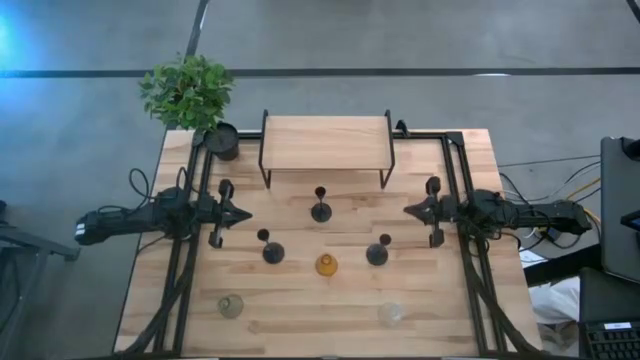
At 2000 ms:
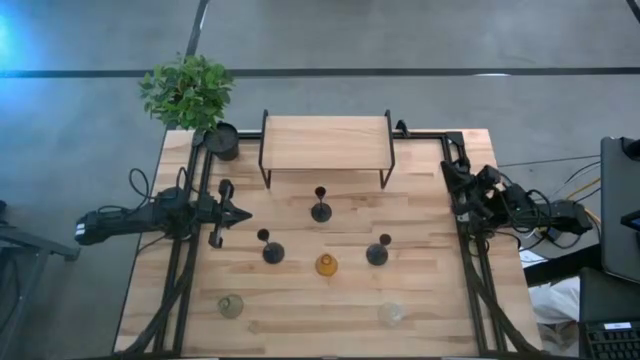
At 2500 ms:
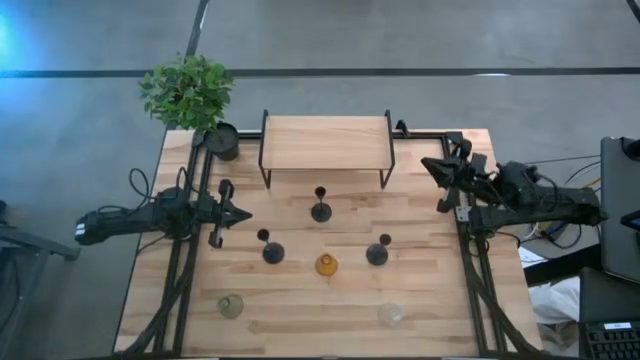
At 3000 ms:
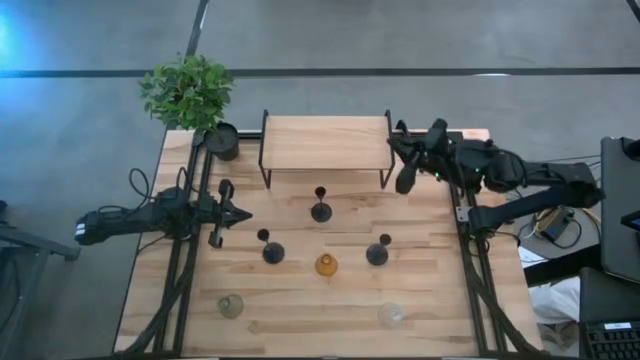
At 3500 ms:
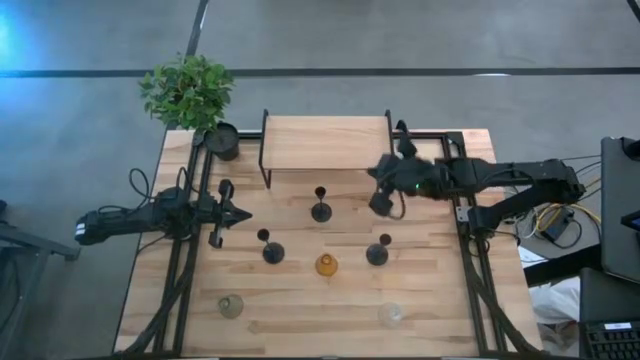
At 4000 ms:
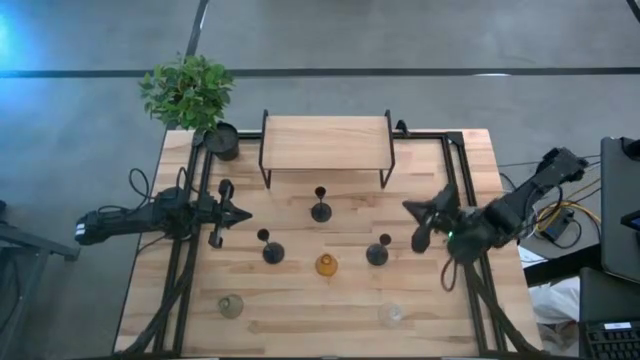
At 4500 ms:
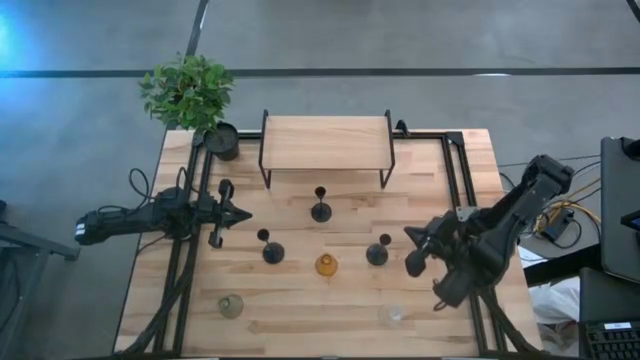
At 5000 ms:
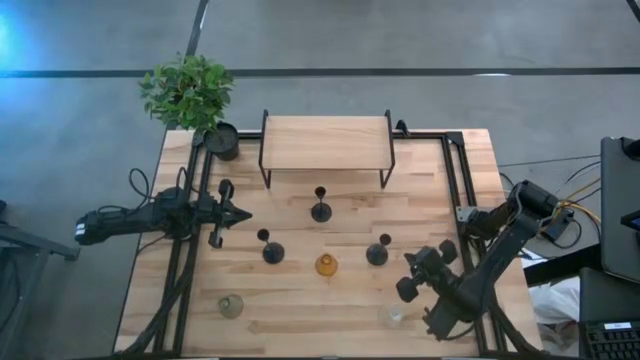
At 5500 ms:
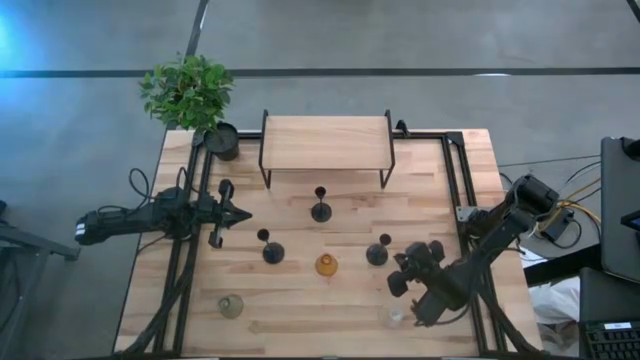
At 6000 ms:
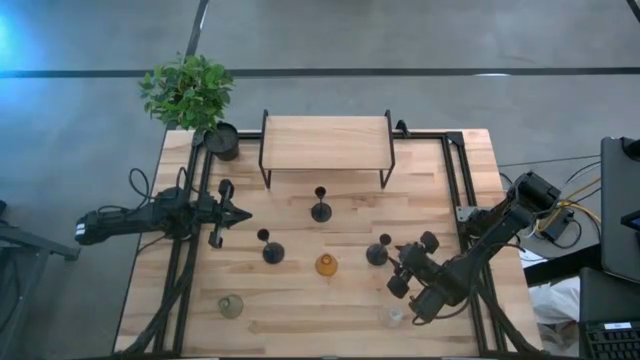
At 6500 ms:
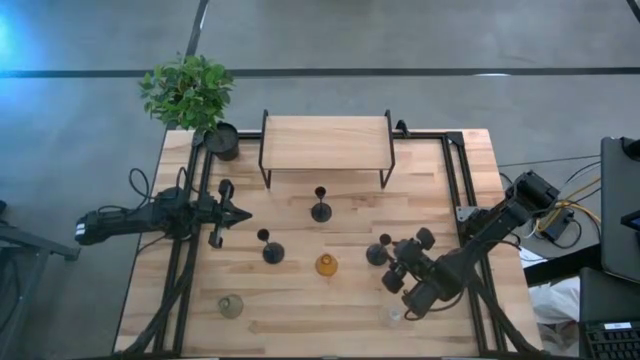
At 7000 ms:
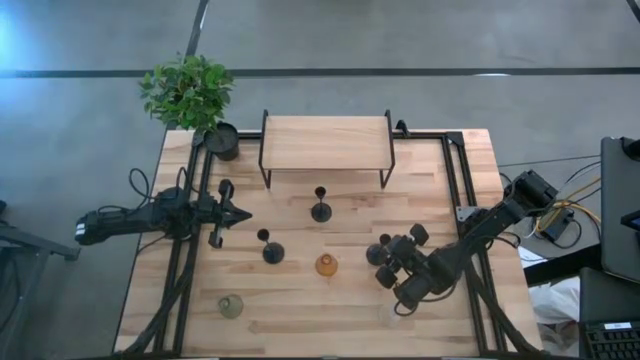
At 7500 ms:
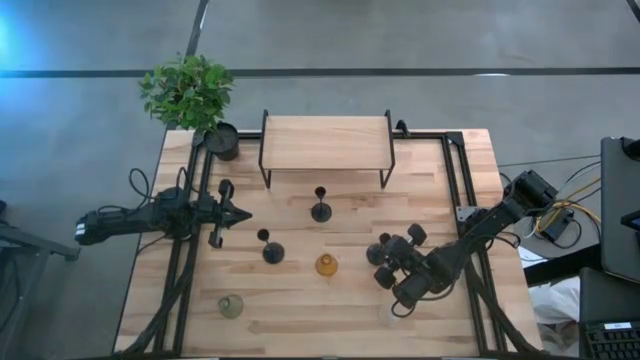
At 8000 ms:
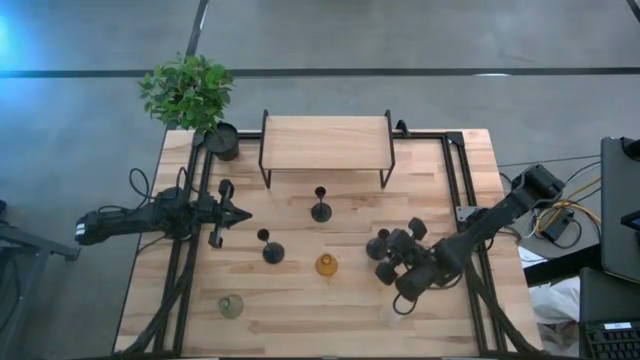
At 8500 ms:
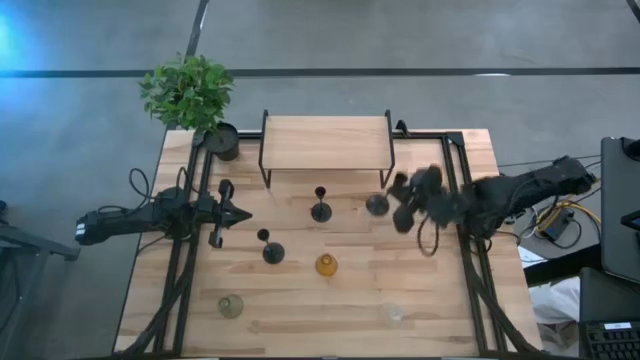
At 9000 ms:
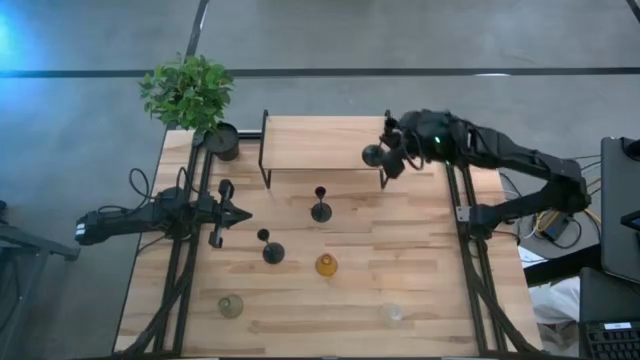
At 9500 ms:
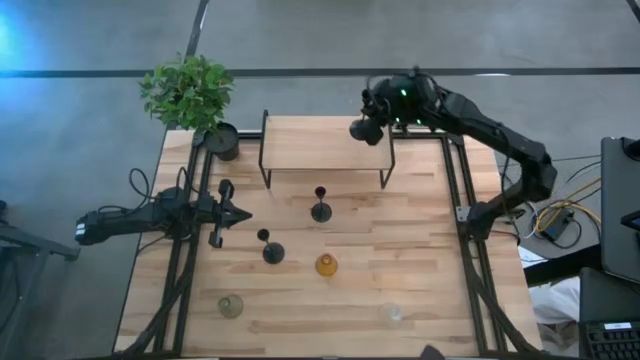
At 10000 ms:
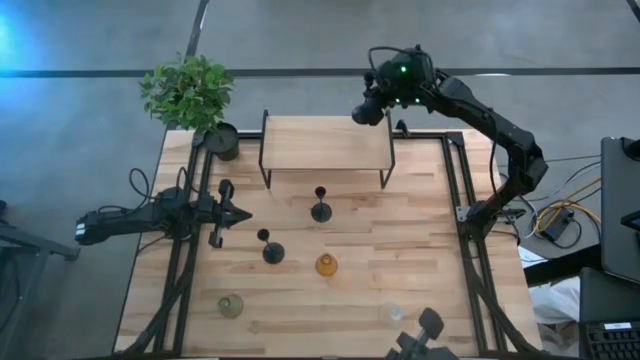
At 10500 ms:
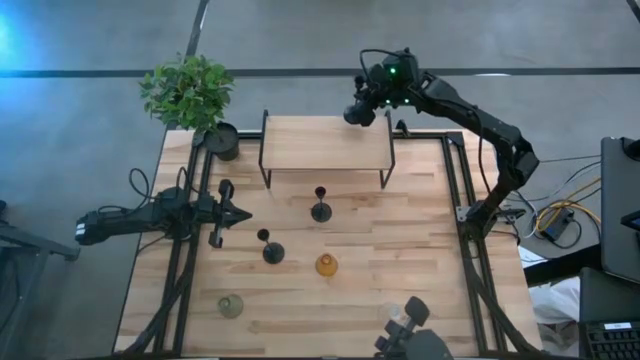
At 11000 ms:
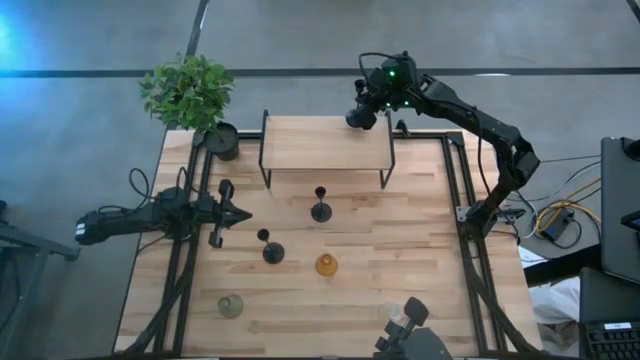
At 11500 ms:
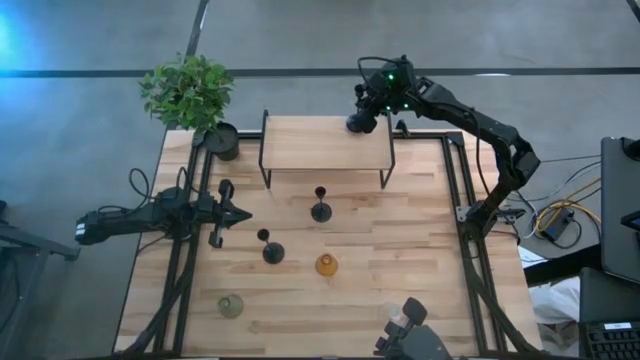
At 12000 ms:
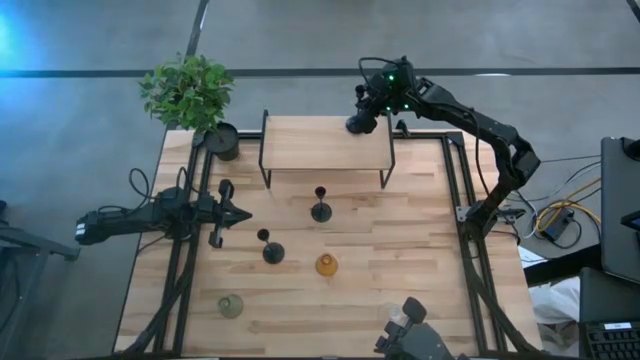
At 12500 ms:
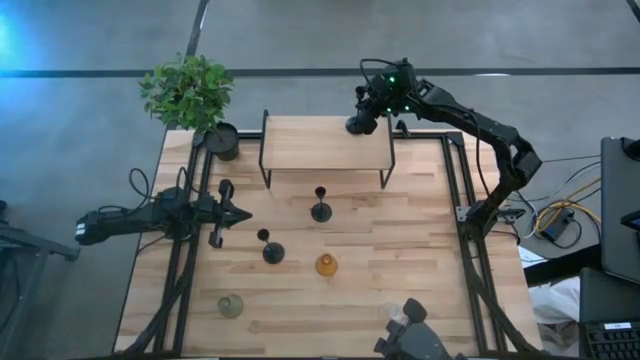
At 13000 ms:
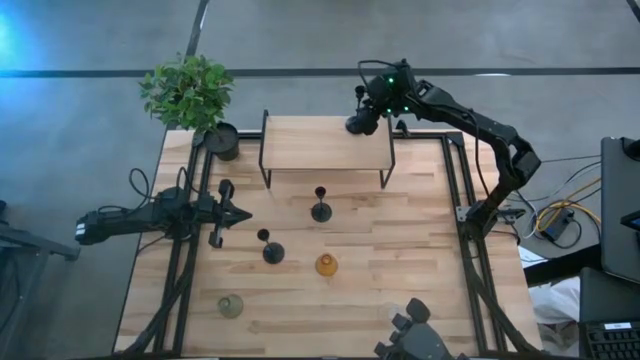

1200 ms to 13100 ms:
Task: Pick & Place candle stick holders
Put the right black candle holder on the shelf

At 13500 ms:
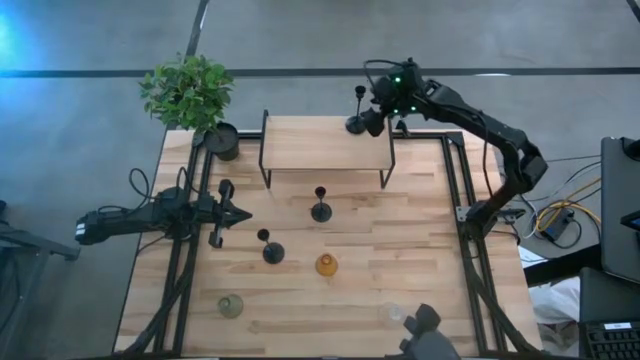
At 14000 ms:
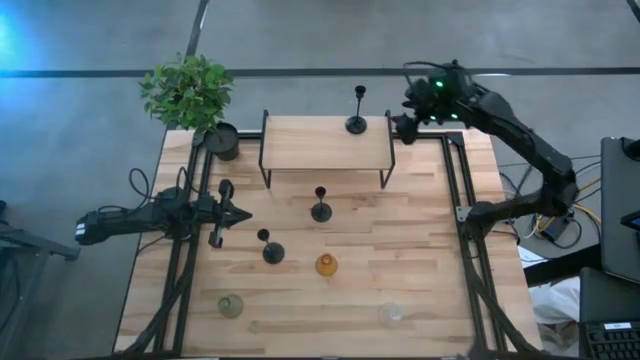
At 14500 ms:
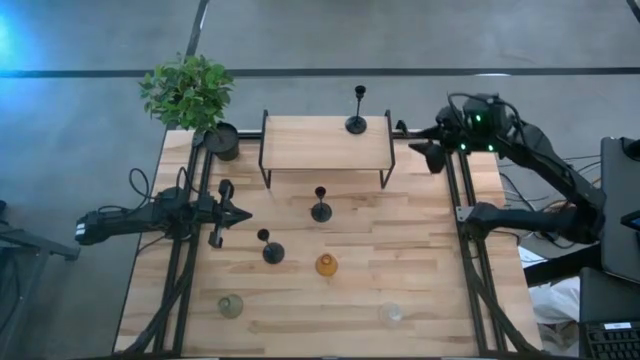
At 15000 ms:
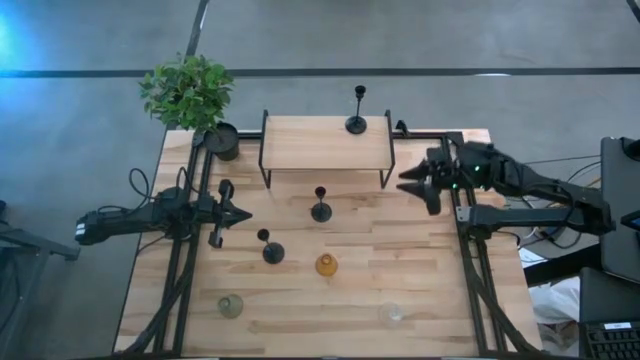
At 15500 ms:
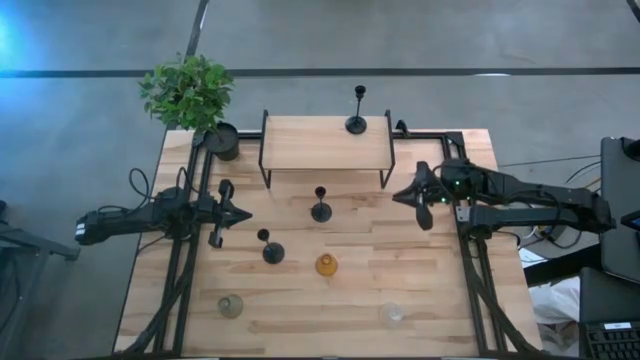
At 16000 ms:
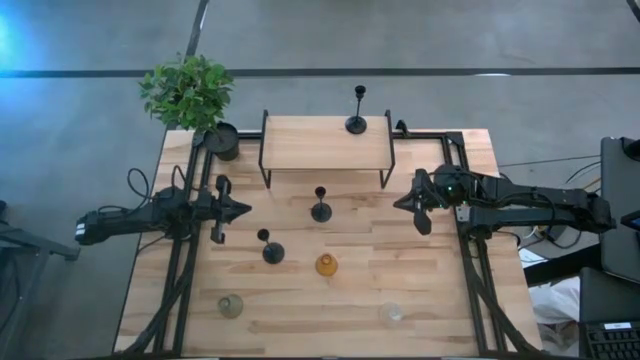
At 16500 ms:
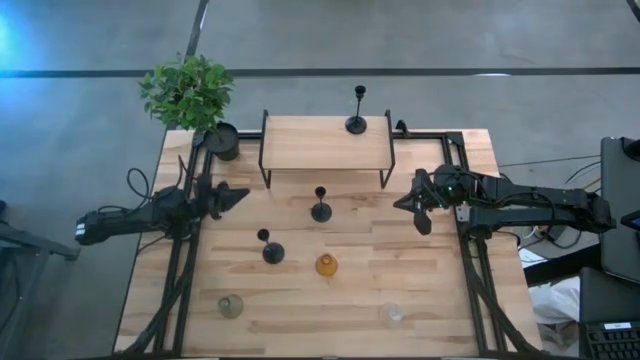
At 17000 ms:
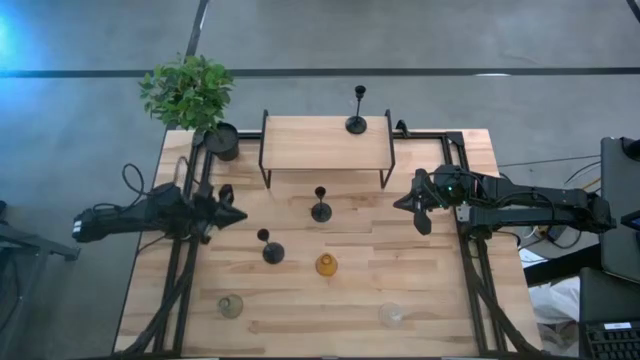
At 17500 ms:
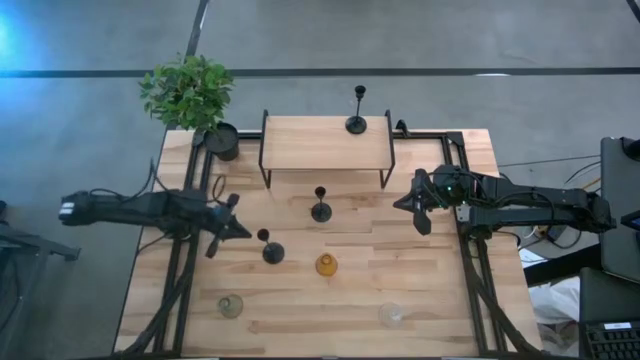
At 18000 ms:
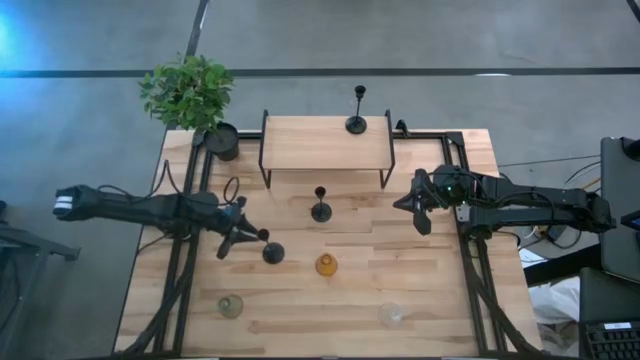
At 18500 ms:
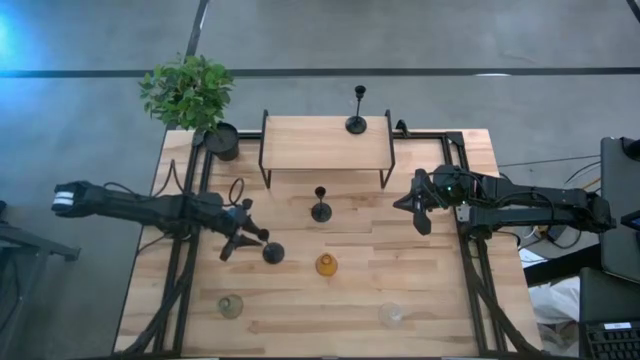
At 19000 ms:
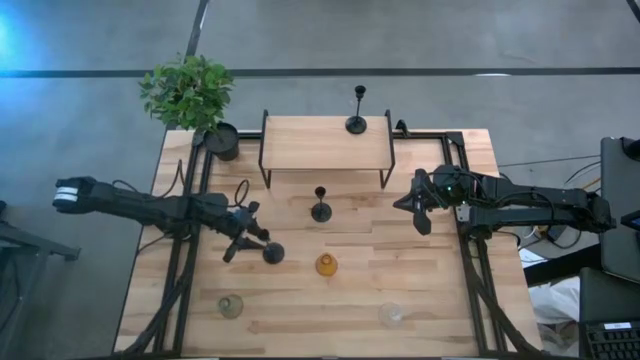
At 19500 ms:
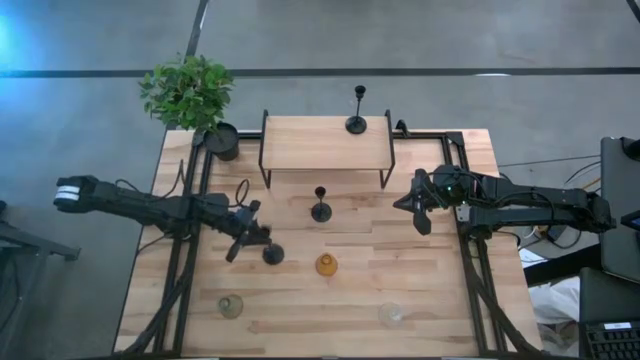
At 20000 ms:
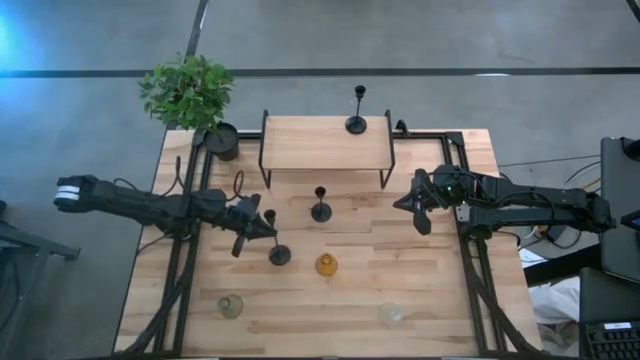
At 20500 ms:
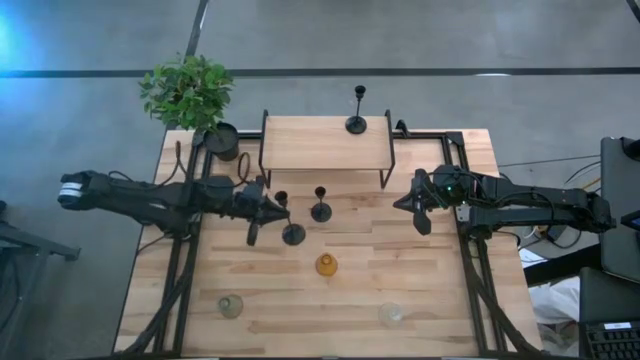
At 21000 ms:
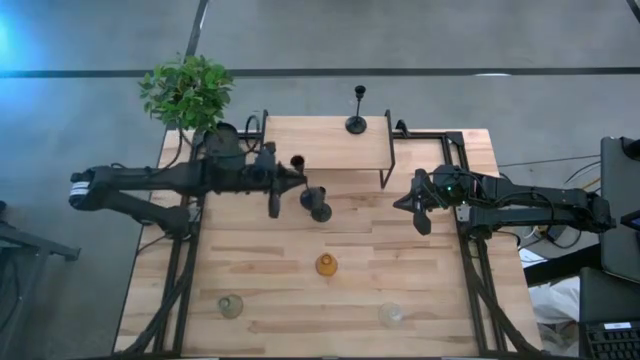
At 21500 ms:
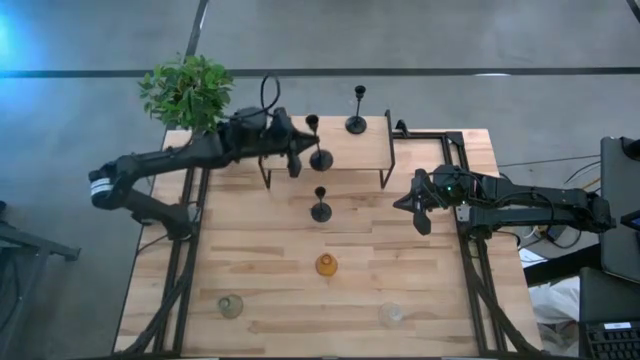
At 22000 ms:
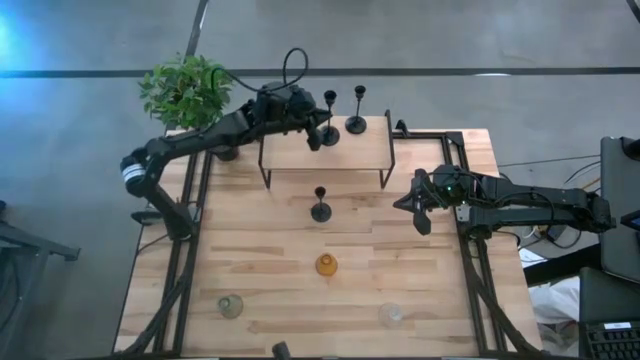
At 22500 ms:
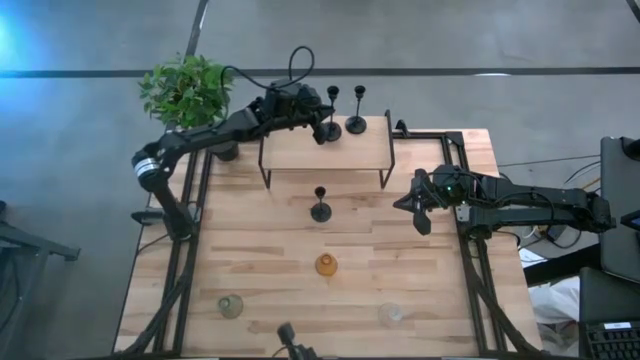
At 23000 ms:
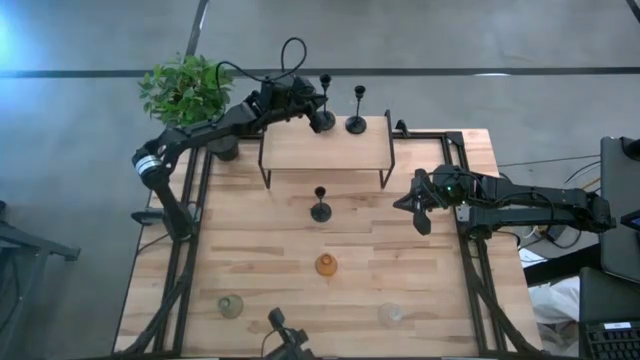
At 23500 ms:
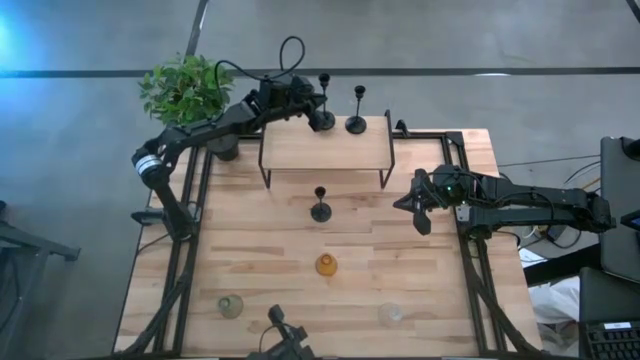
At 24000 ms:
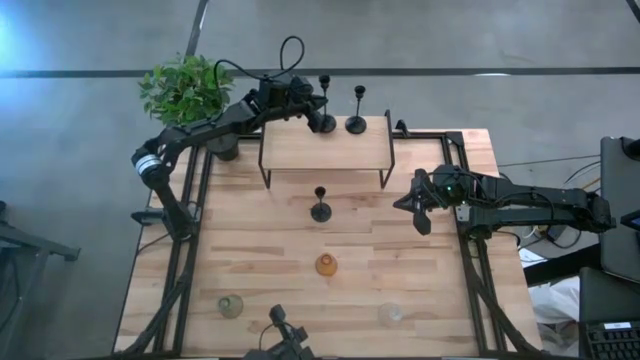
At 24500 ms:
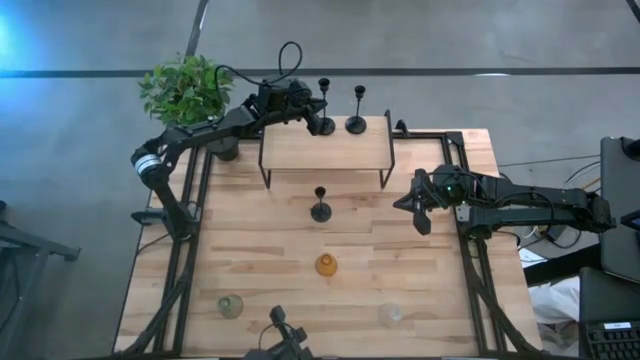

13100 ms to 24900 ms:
Put the left black candle holder on the shelf
